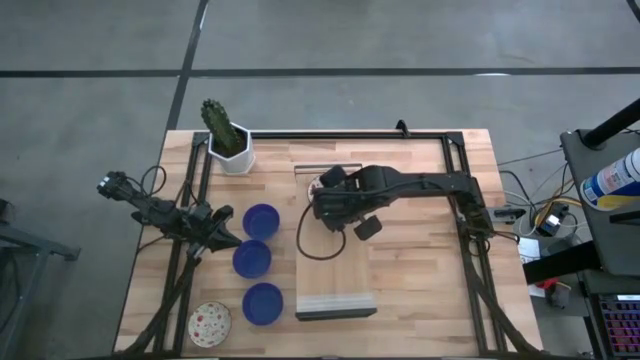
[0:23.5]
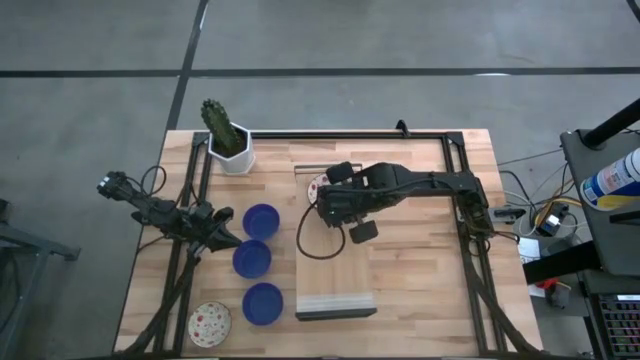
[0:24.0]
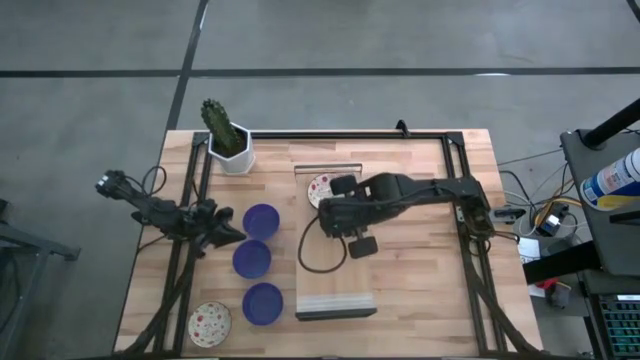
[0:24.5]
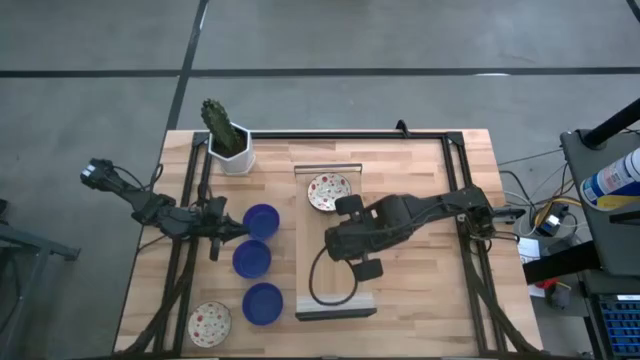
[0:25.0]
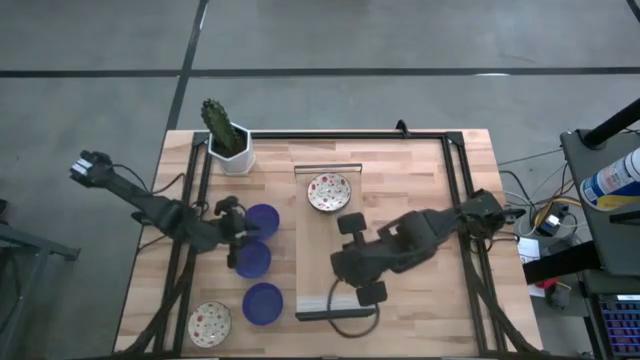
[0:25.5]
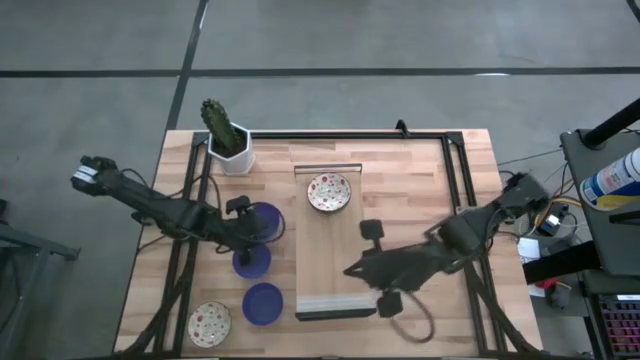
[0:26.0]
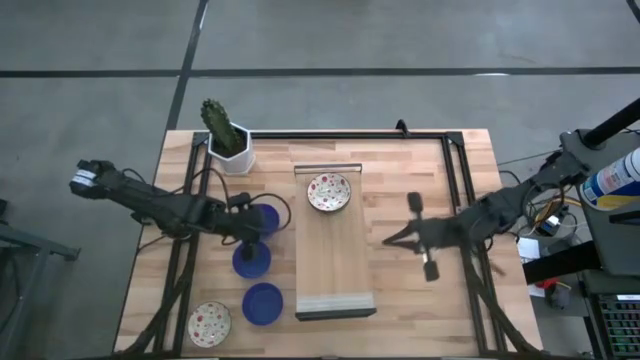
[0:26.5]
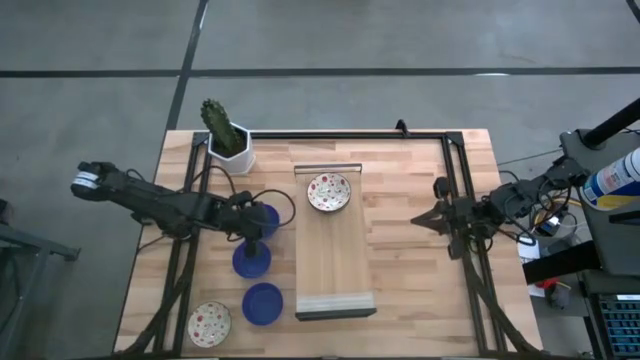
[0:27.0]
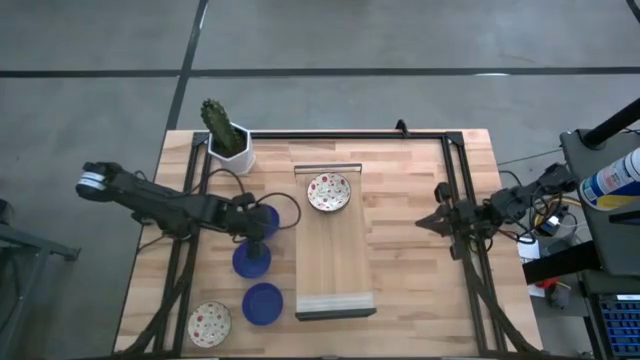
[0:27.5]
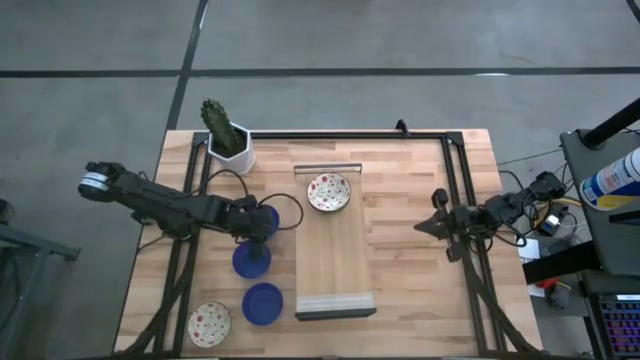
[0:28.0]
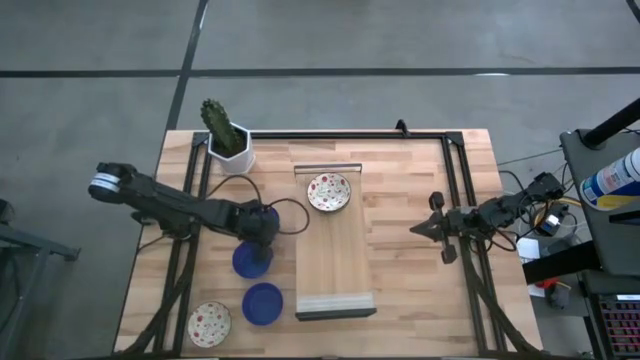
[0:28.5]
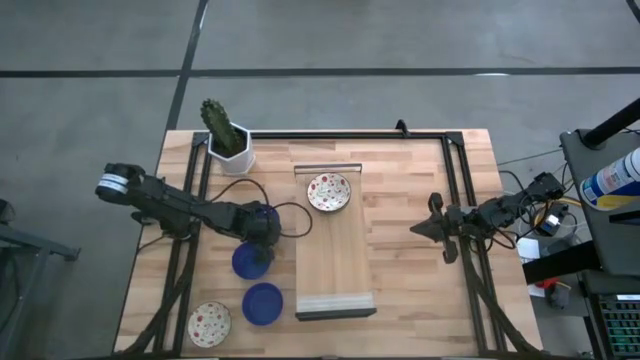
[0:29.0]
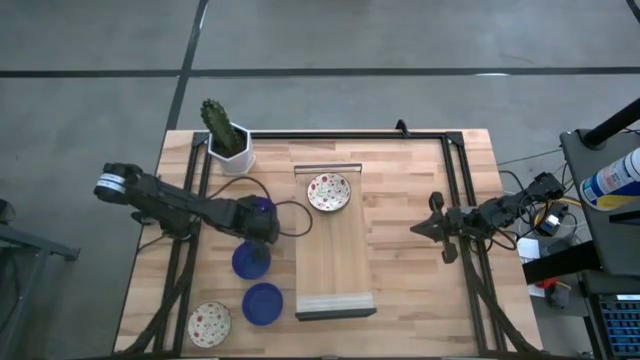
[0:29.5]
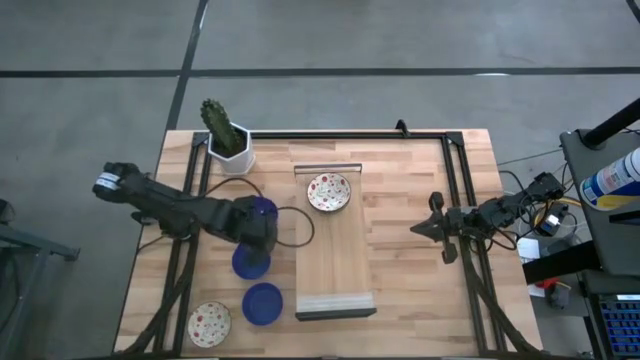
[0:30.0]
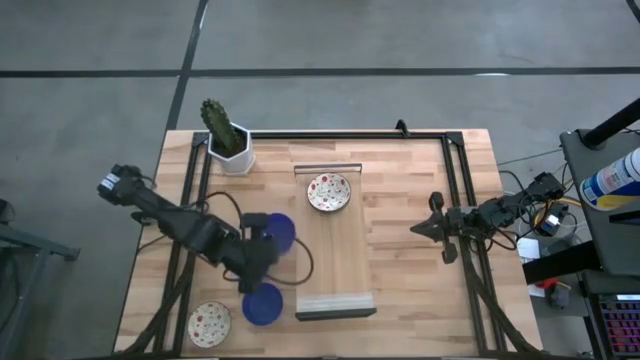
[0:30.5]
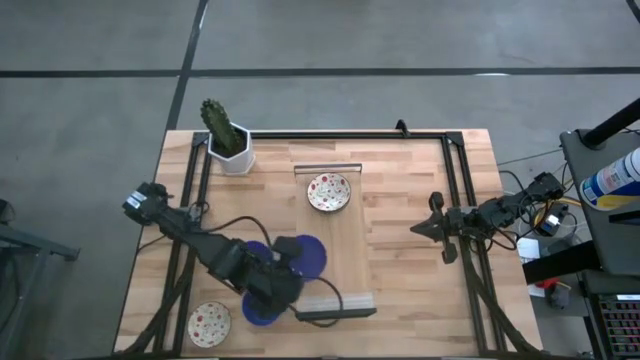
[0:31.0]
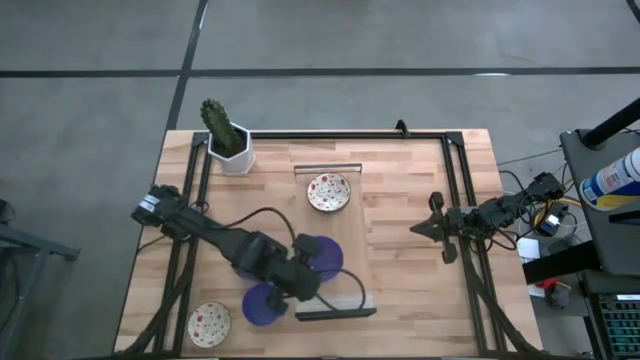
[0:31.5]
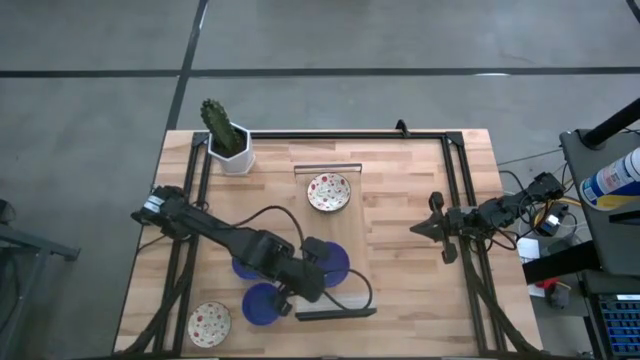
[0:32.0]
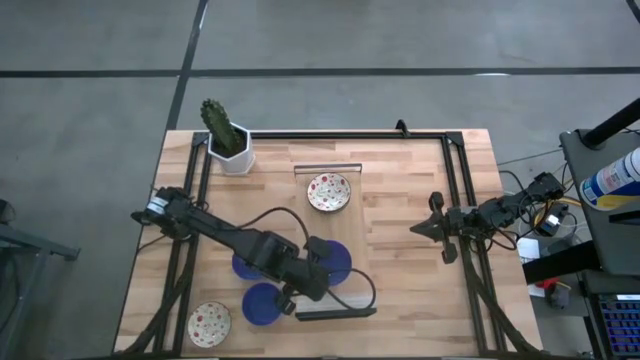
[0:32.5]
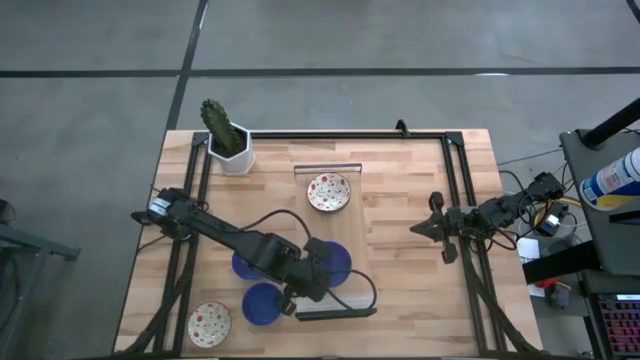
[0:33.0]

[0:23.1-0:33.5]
Task: Pick & Place Mini bowls
Put the top blue bowl on the shelf

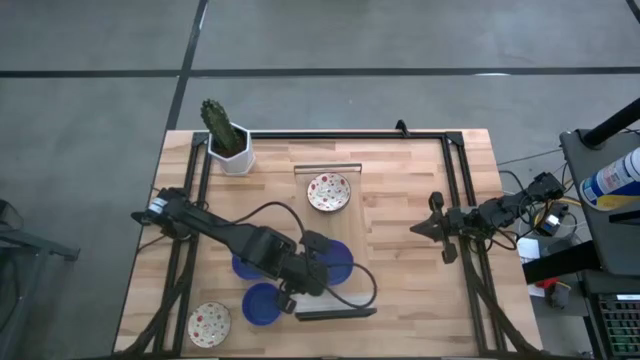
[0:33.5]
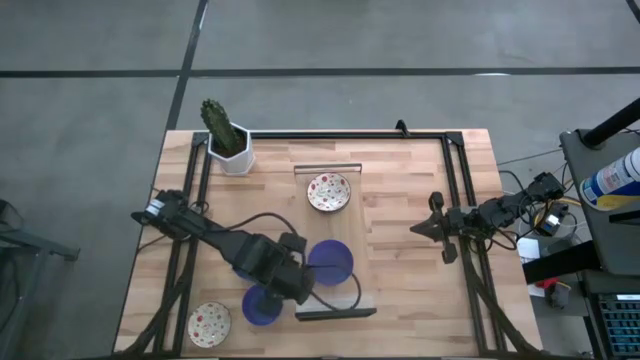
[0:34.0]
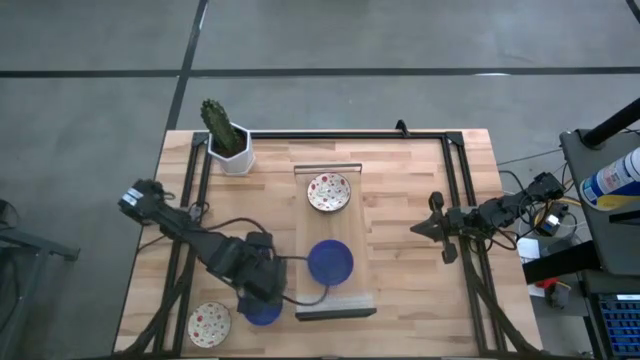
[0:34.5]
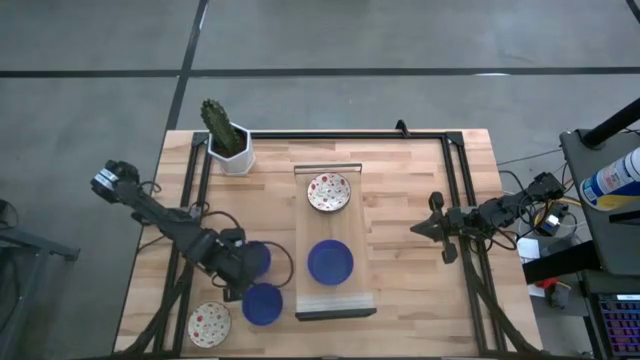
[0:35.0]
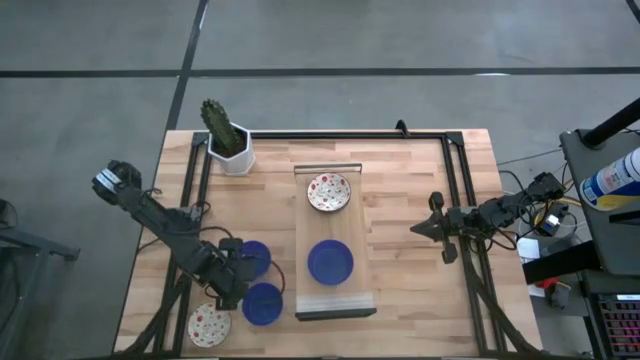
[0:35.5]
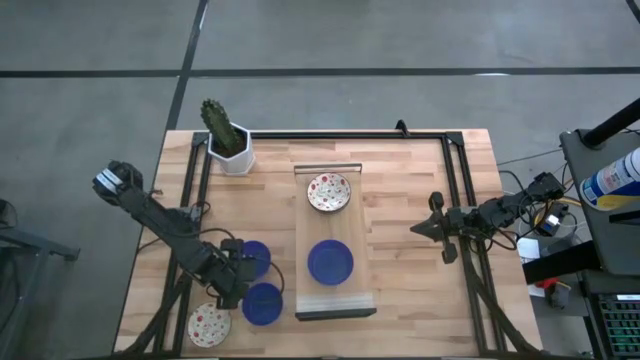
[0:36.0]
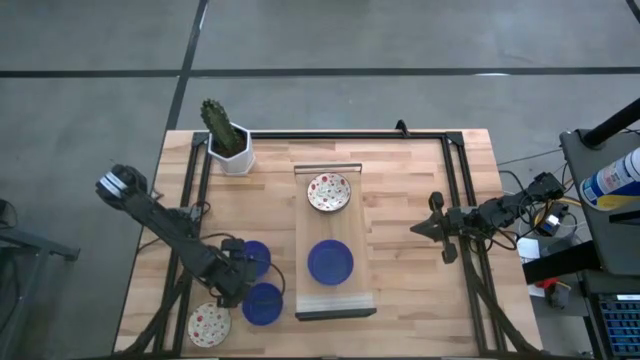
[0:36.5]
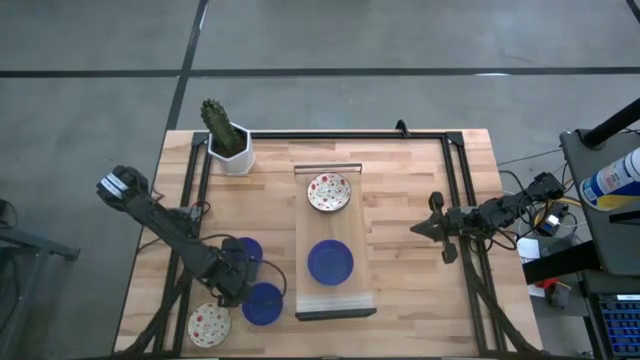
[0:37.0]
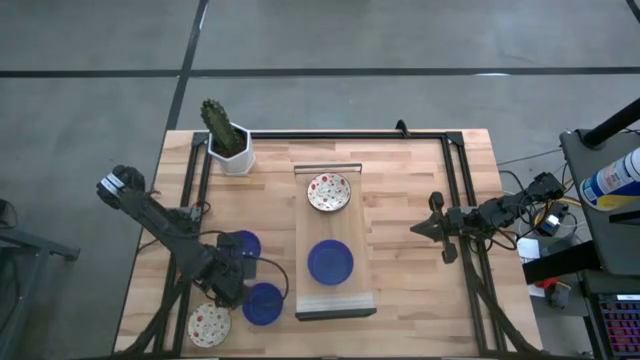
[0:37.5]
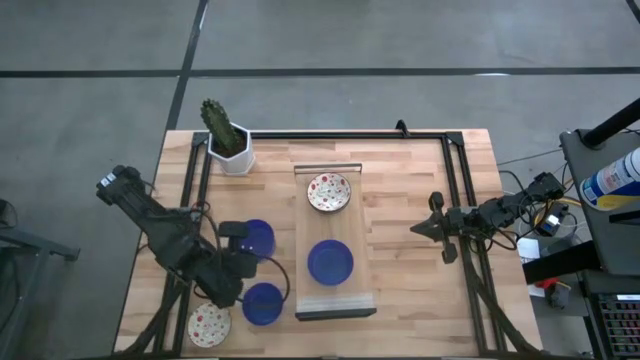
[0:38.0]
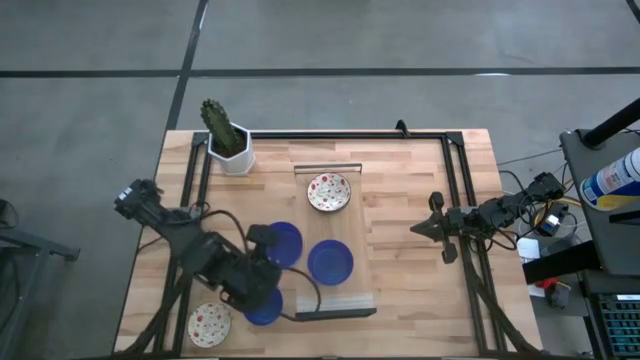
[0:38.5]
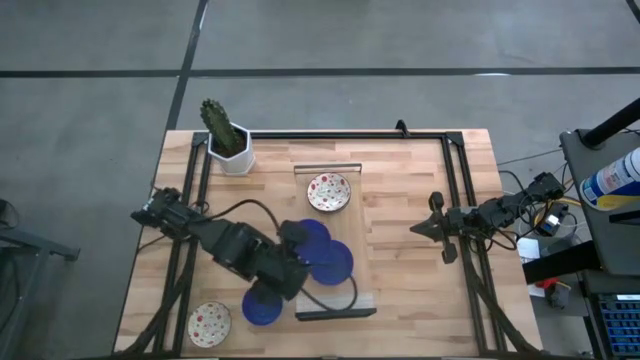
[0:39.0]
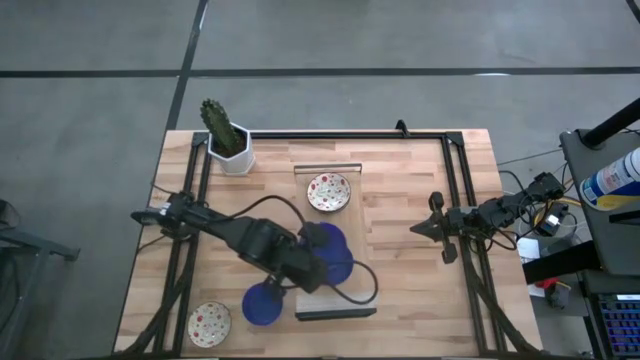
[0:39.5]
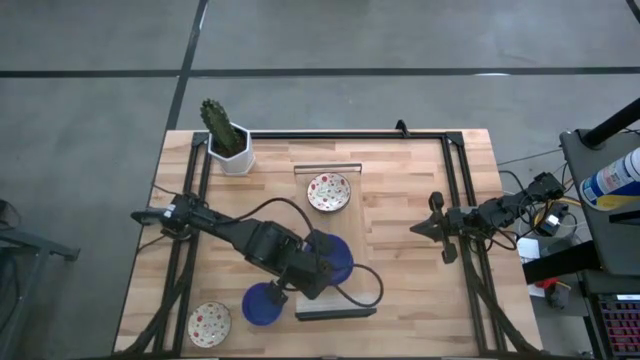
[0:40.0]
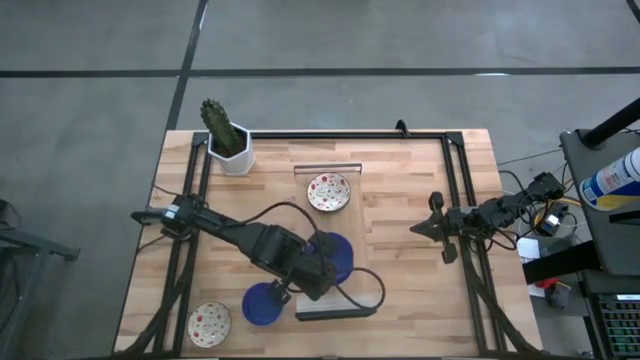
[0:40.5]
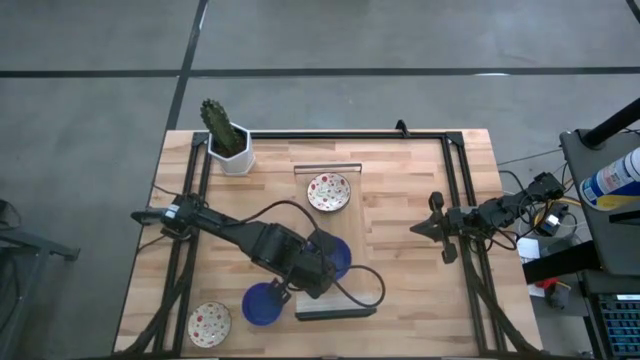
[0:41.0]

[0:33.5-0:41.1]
Stack the top blue bowl on top of the blue bowl on the shelf
